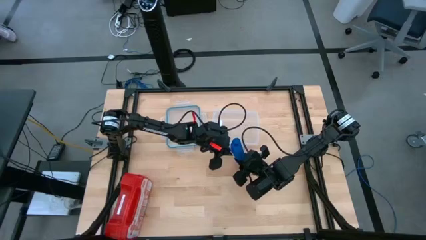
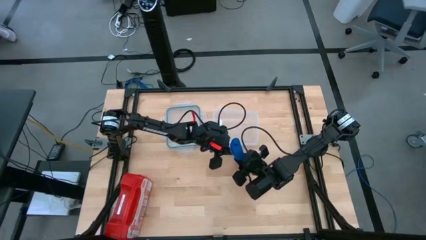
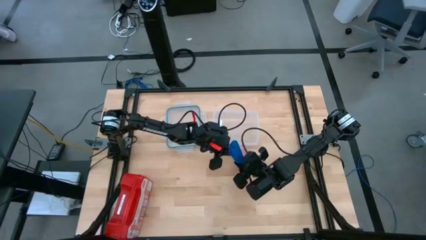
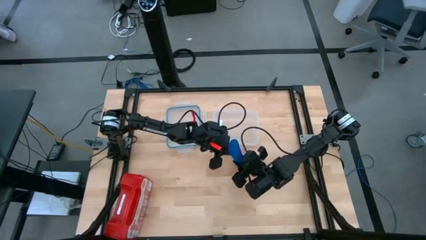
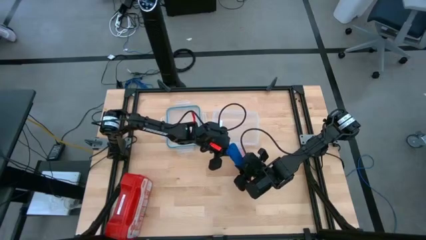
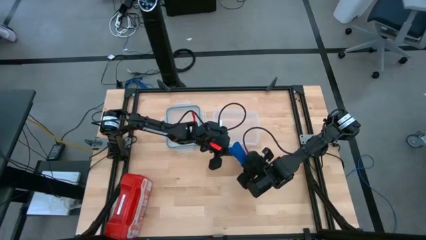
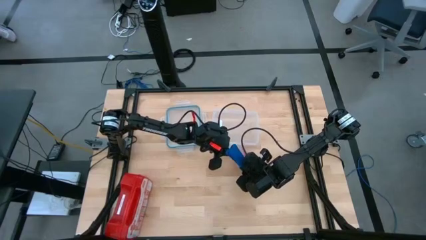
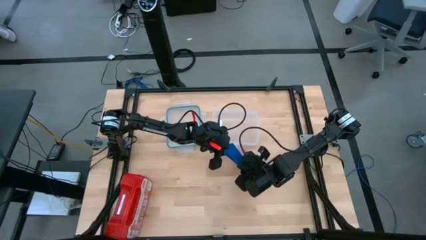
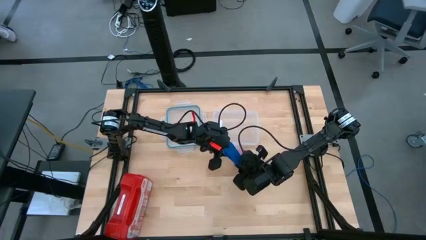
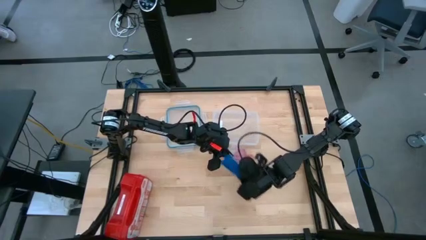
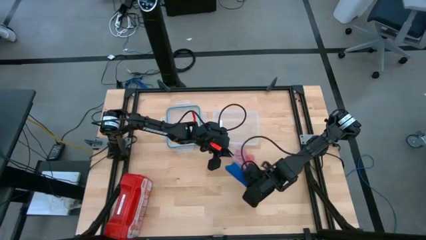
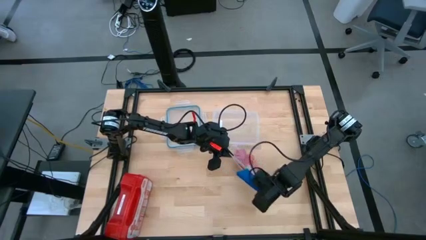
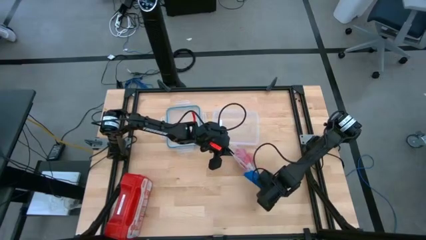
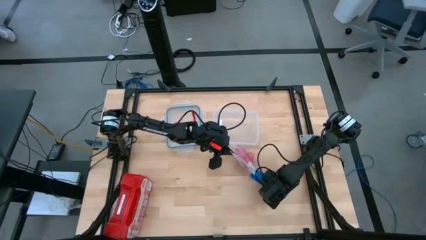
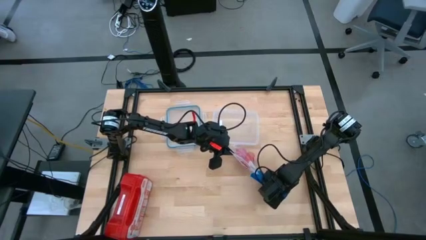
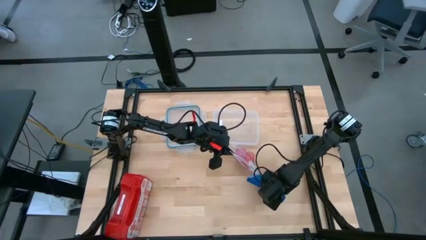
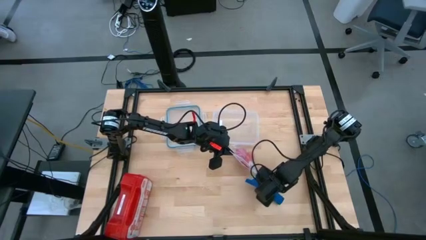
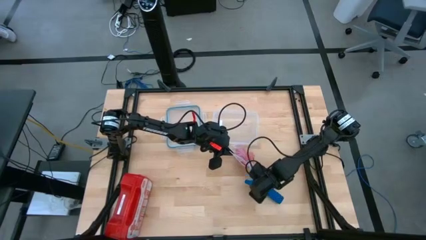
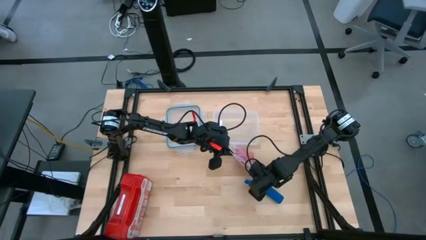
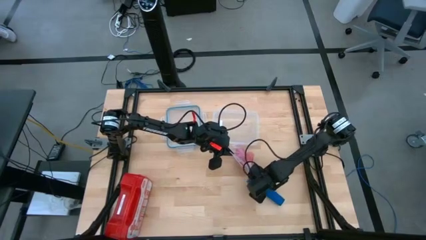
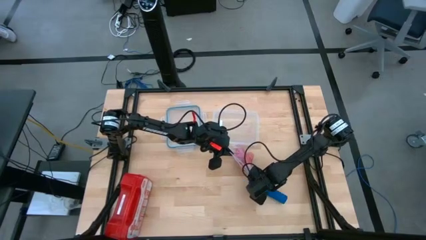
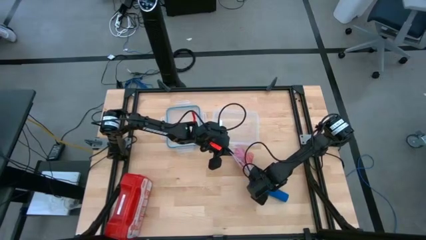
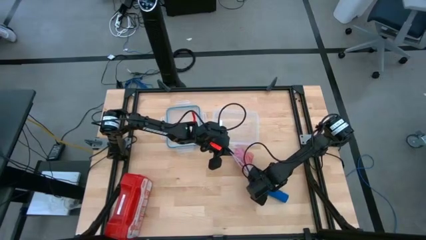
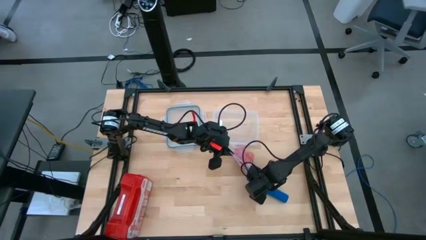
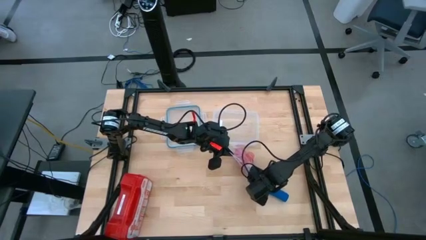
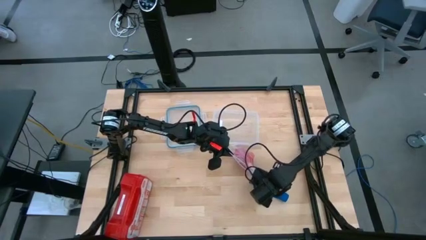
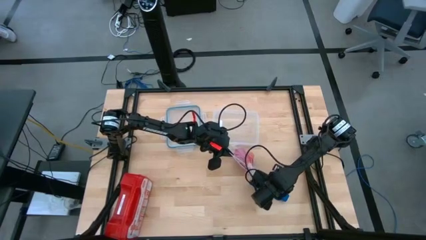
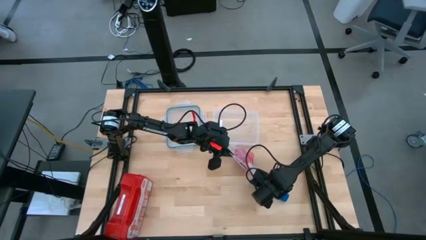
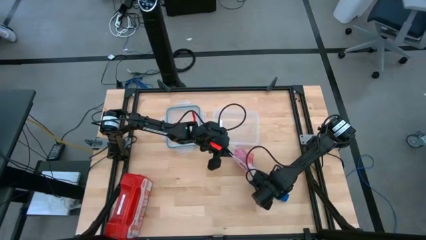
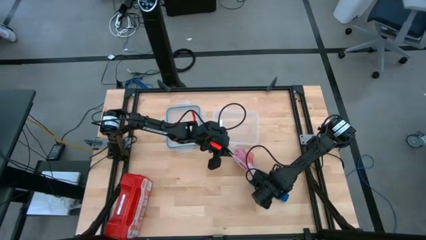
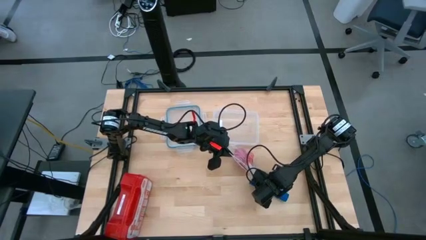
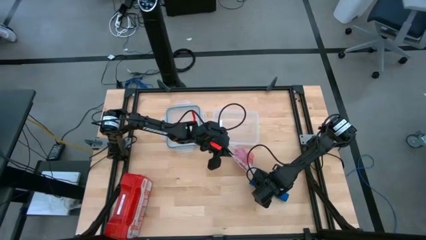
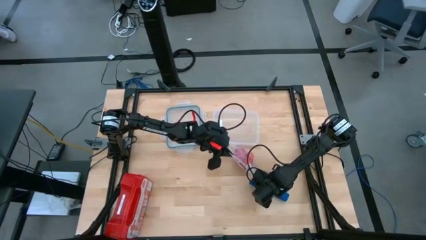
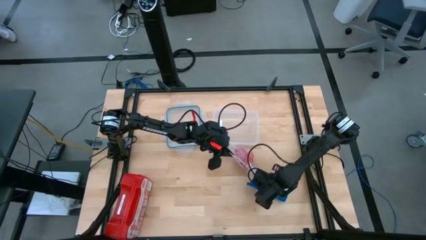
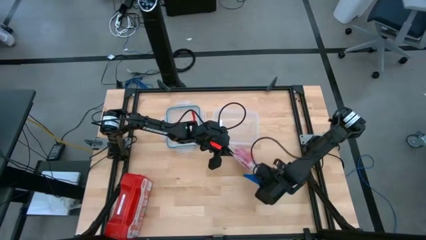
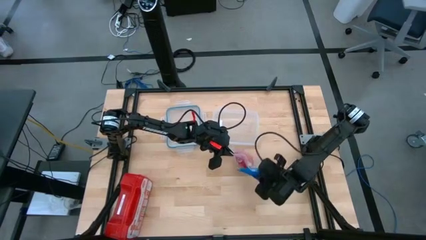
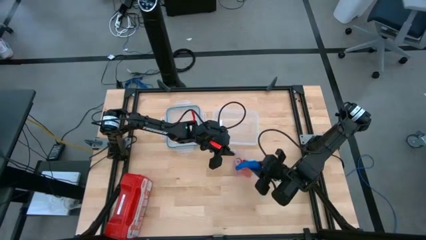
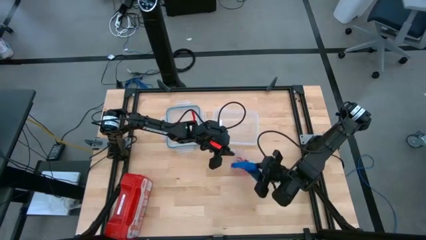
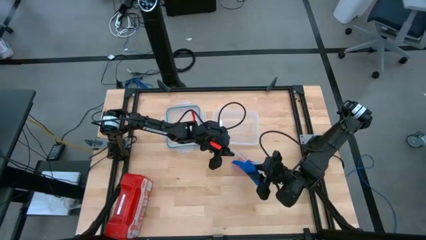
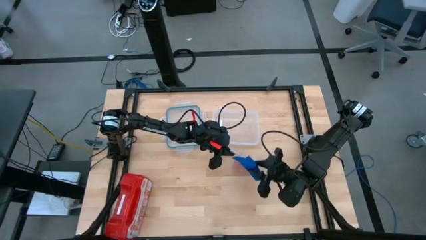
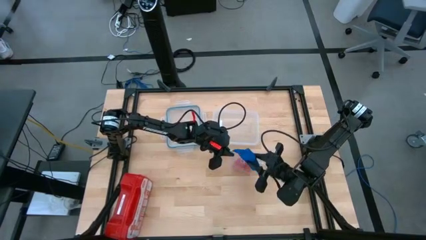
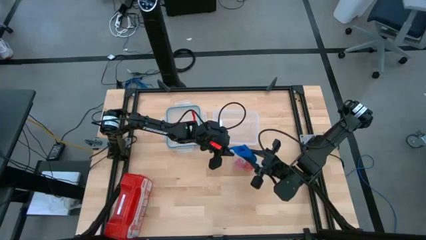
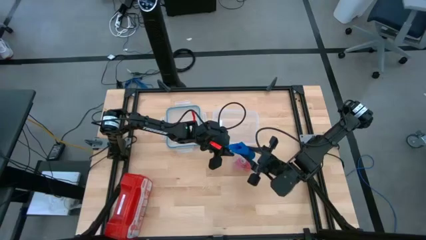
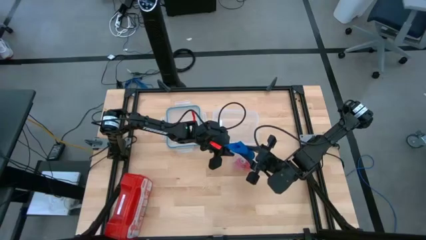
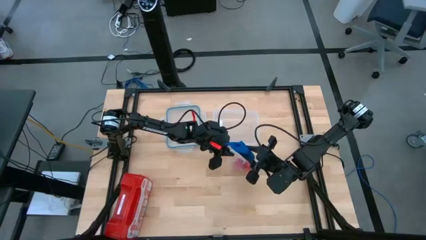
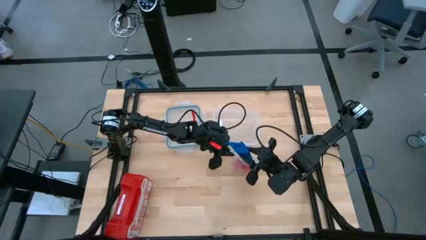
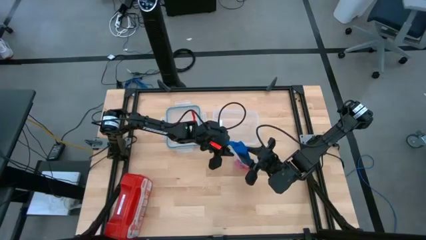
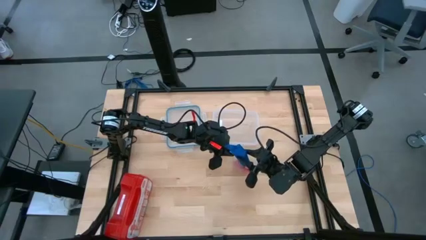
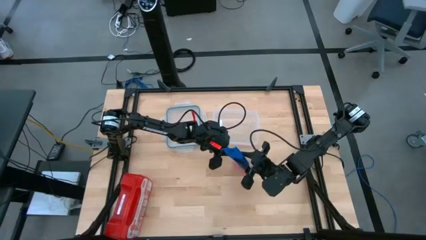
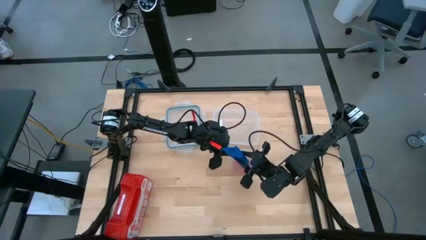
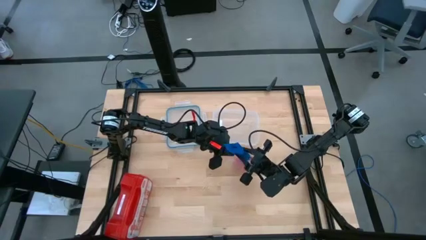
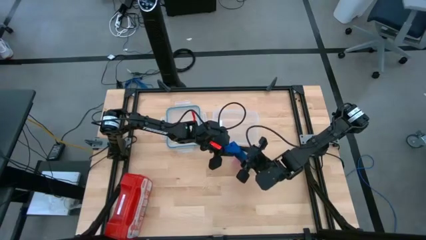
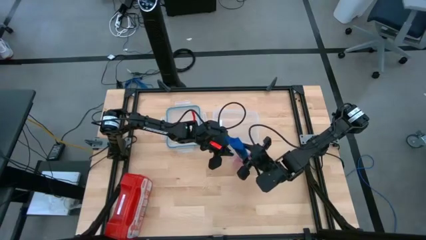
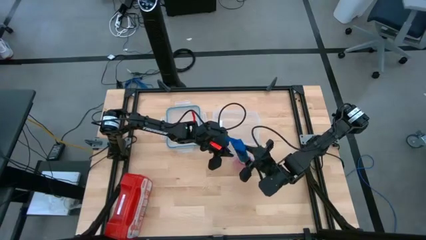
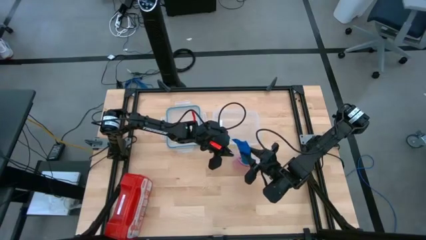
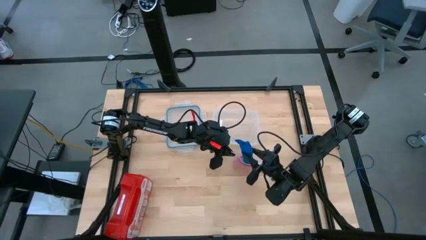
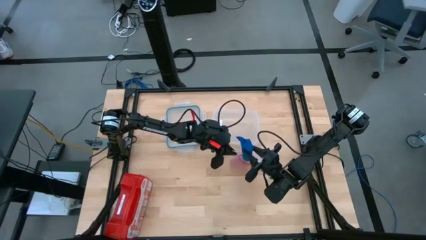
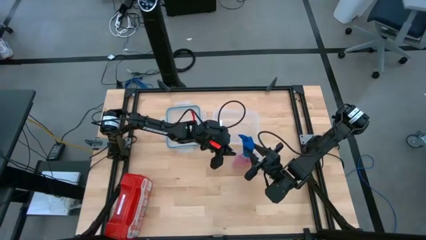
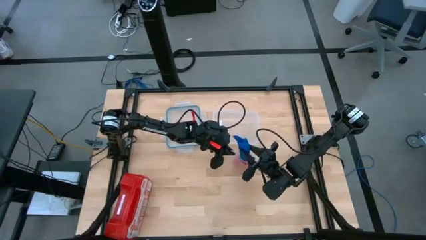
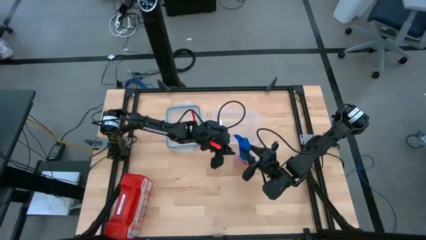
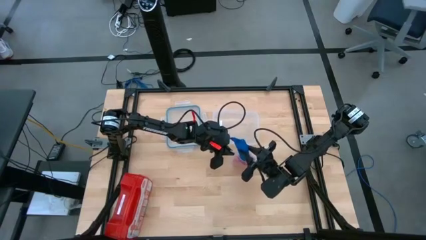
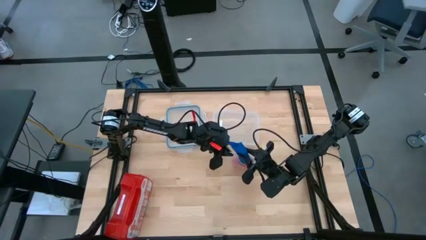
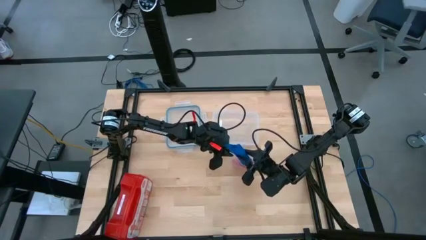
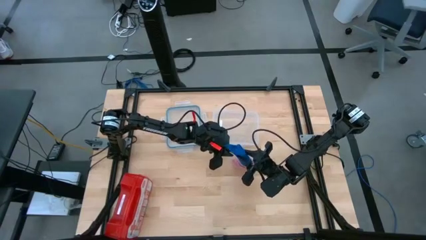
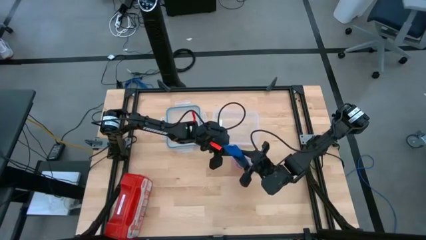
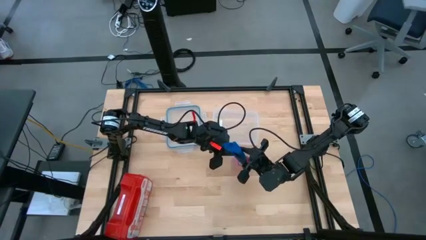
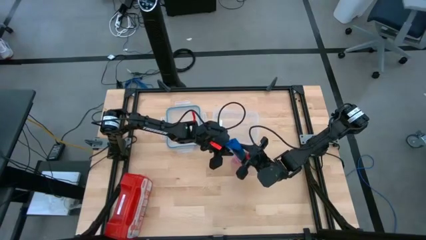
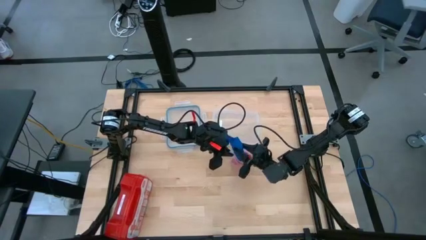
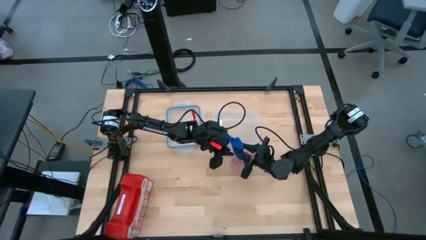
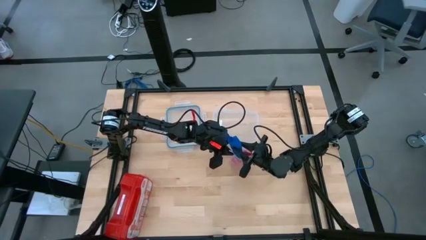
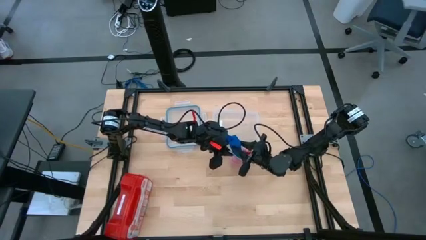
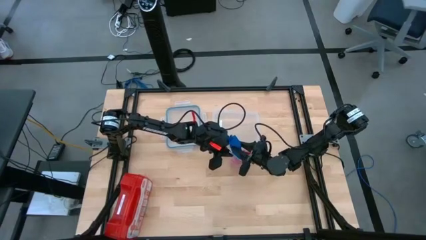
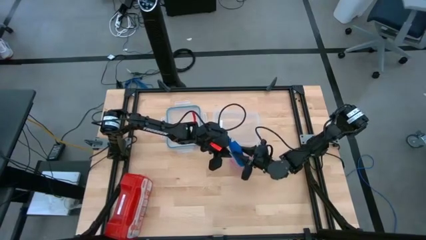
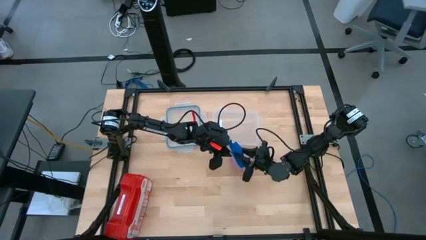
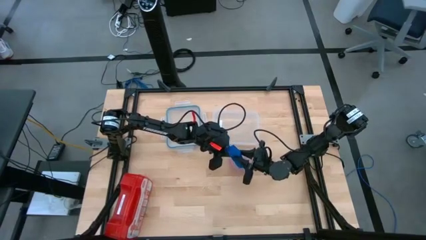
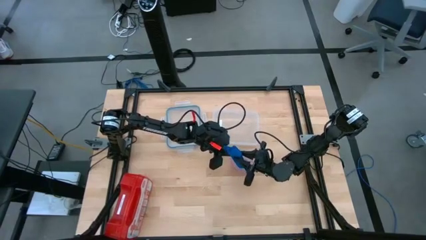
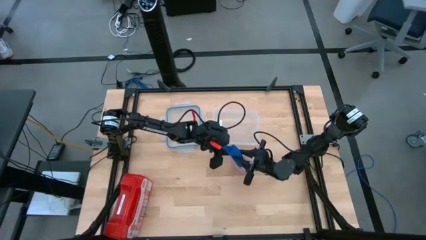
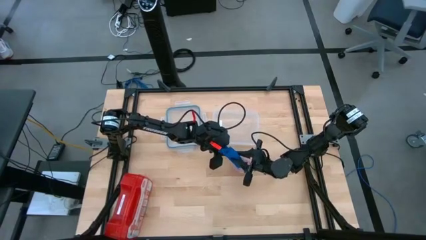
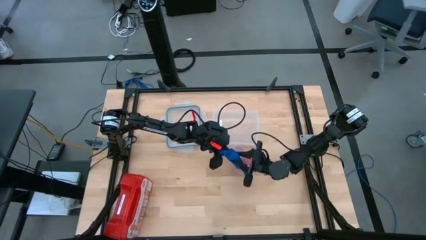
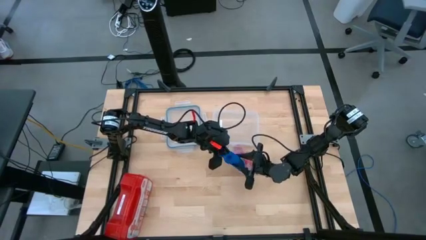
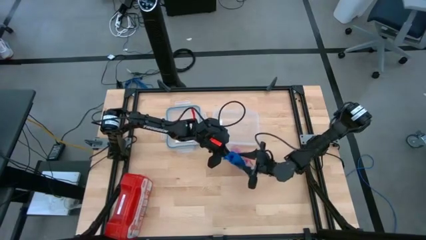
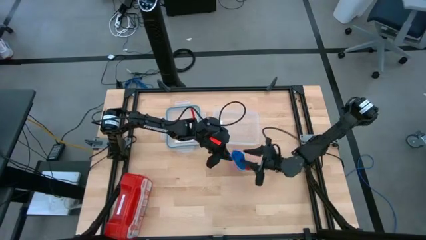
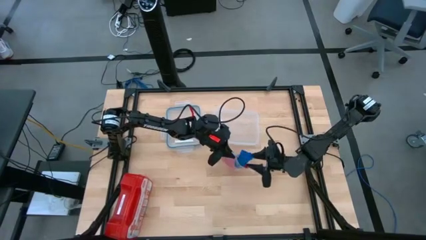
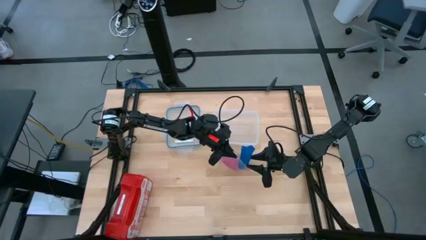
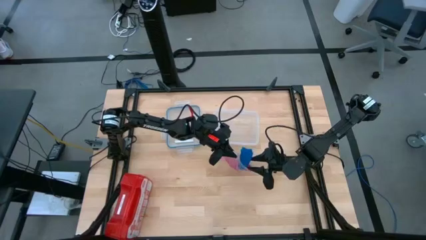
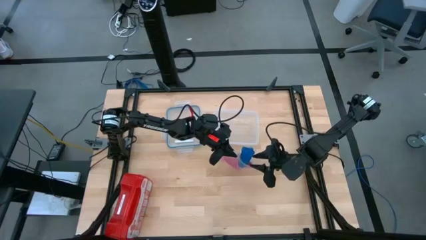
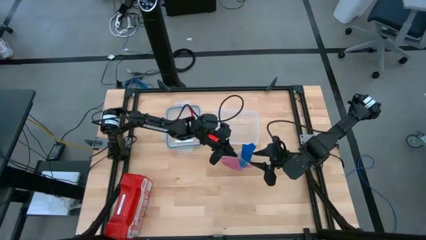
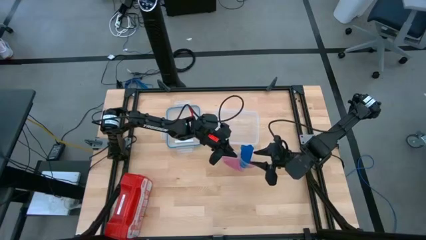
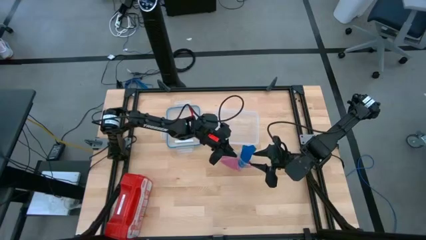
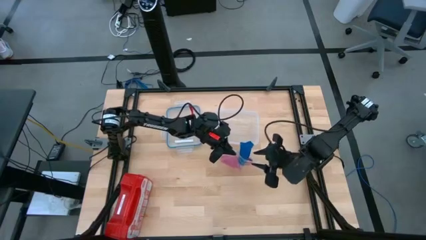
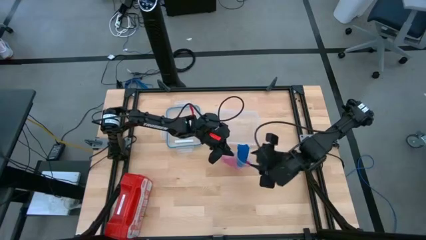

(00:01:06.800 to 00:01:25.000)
Task: Roll bandage
Put the blue bandage into the transparent zip bag
